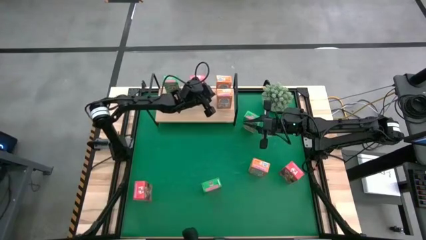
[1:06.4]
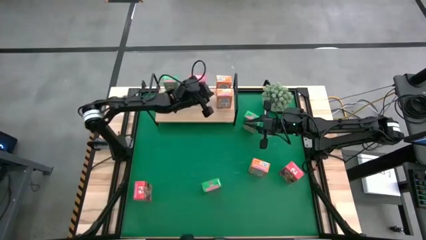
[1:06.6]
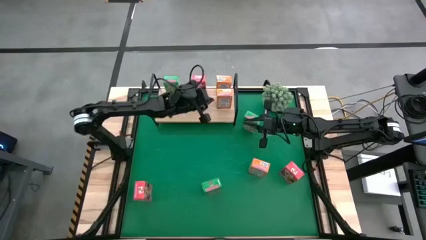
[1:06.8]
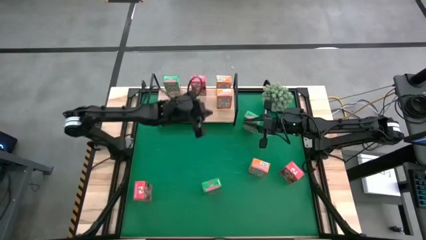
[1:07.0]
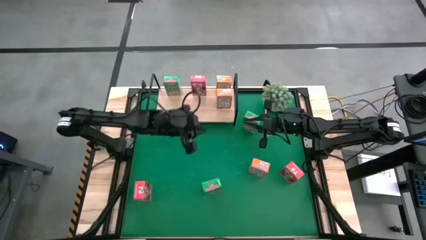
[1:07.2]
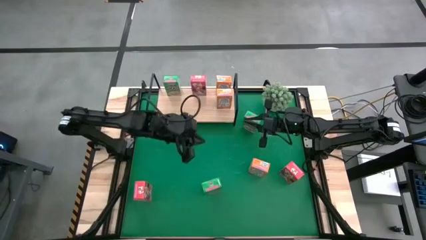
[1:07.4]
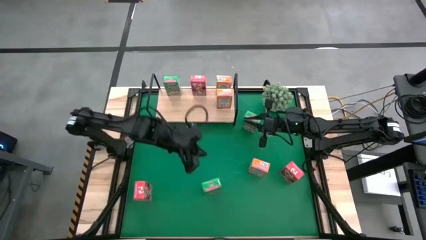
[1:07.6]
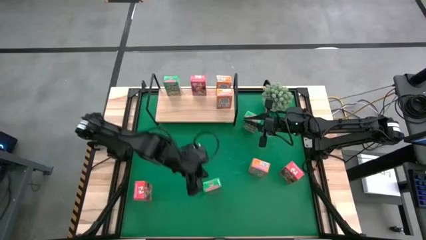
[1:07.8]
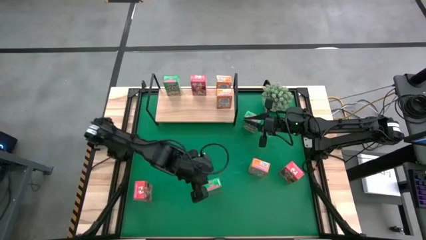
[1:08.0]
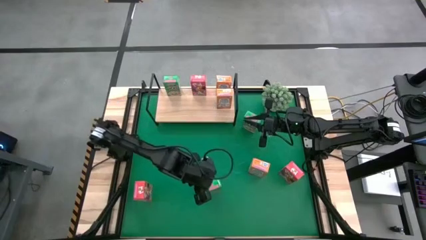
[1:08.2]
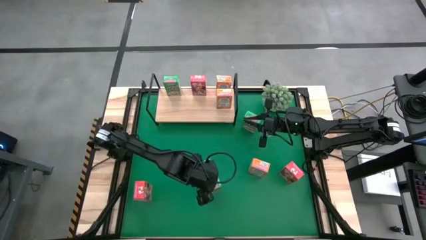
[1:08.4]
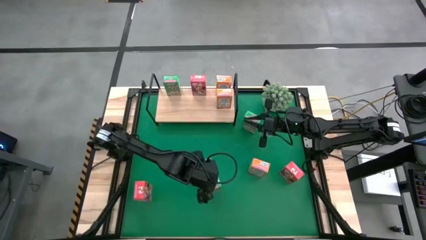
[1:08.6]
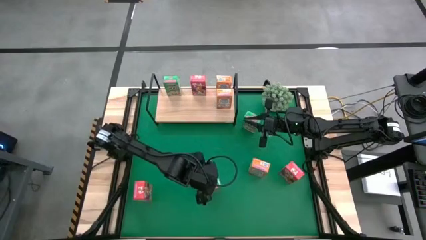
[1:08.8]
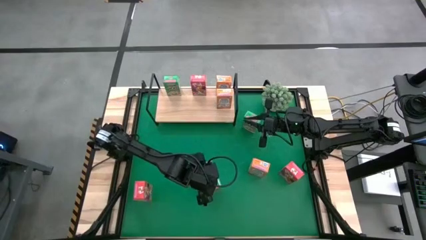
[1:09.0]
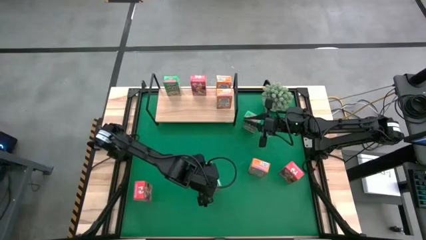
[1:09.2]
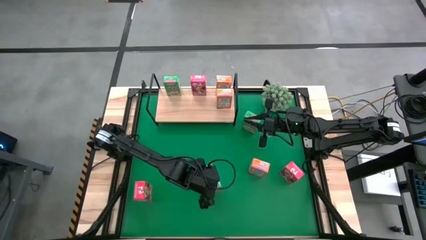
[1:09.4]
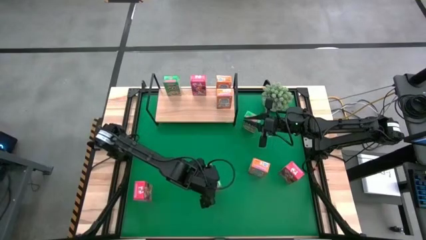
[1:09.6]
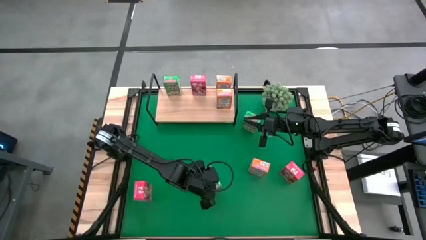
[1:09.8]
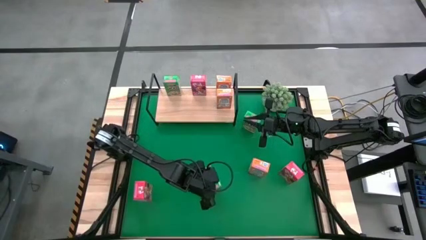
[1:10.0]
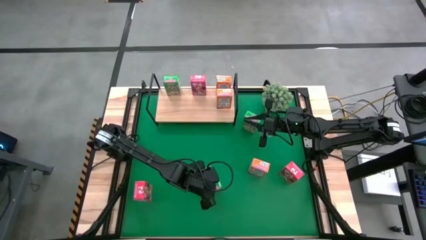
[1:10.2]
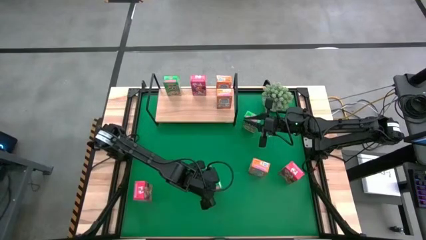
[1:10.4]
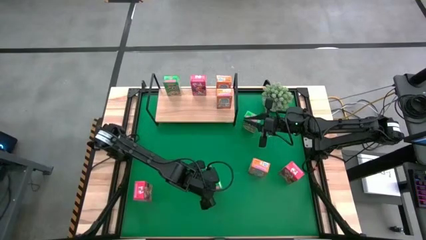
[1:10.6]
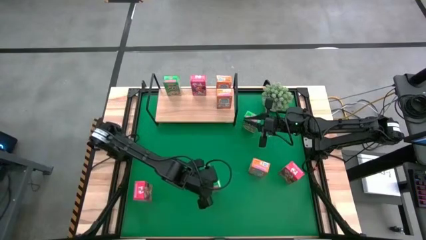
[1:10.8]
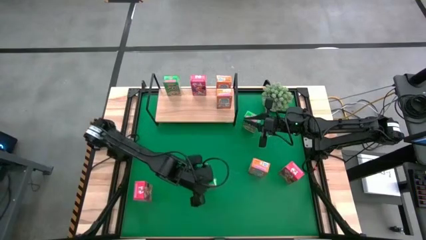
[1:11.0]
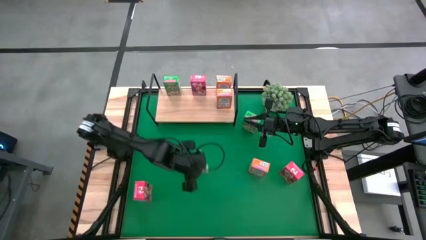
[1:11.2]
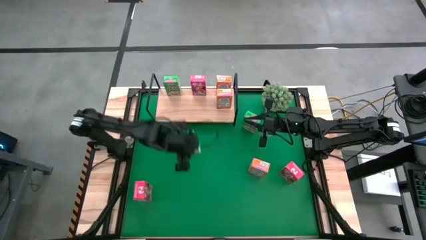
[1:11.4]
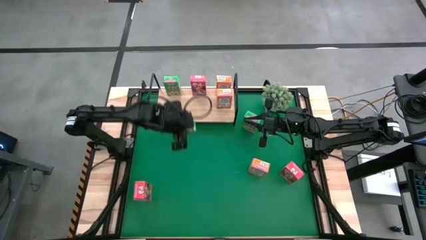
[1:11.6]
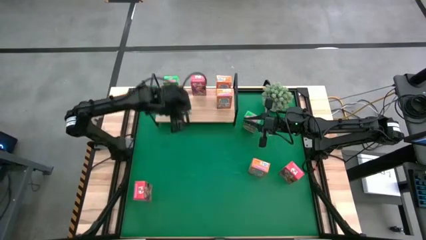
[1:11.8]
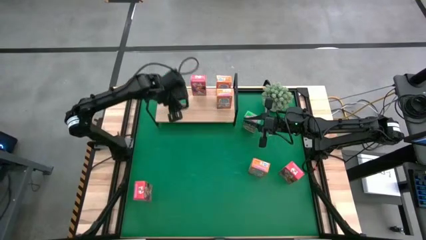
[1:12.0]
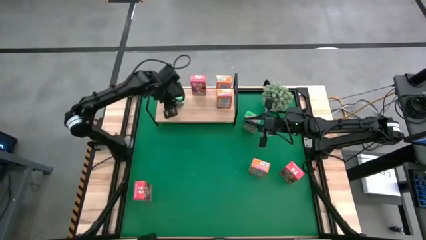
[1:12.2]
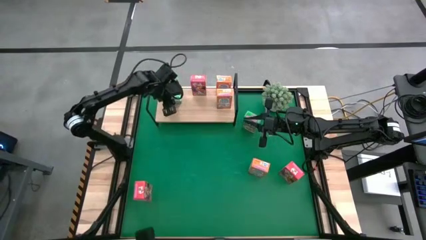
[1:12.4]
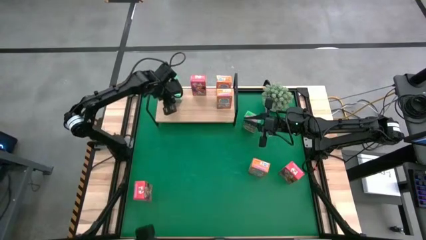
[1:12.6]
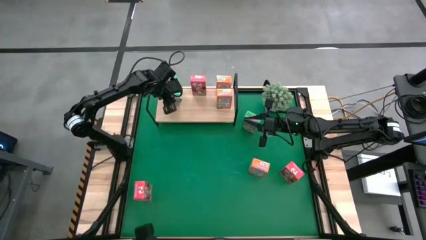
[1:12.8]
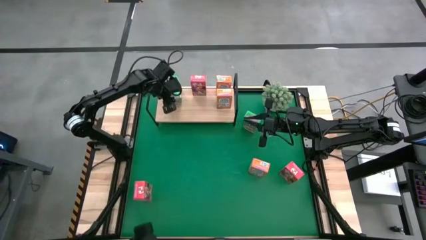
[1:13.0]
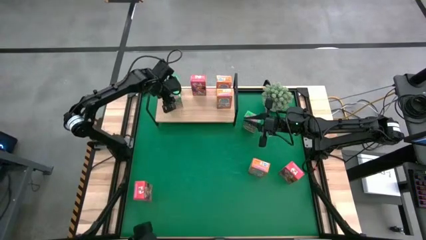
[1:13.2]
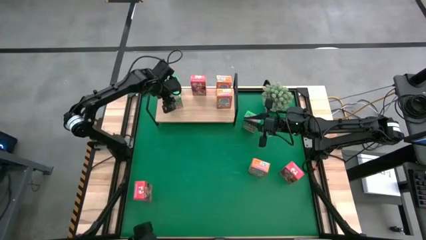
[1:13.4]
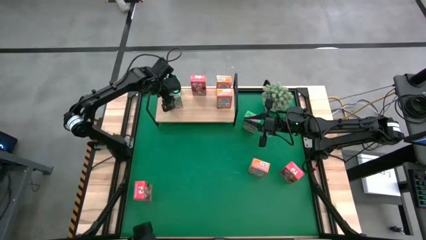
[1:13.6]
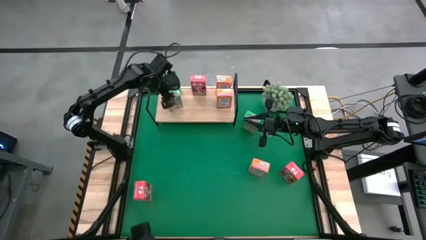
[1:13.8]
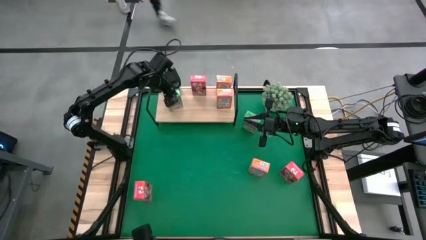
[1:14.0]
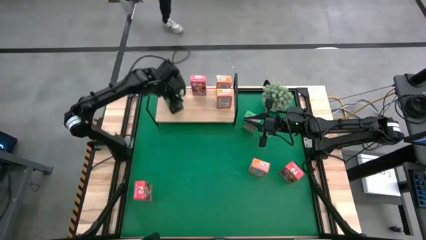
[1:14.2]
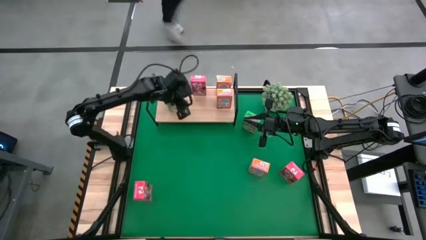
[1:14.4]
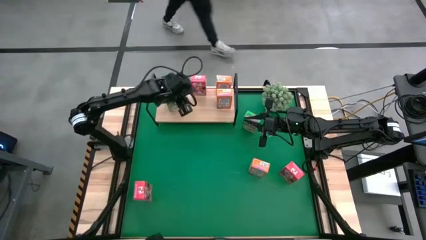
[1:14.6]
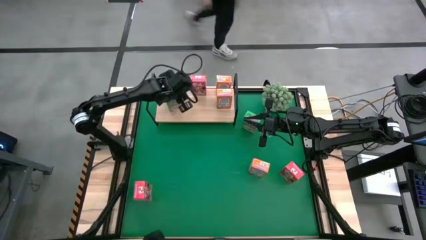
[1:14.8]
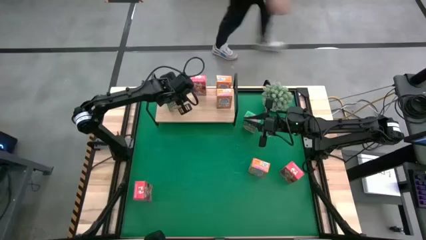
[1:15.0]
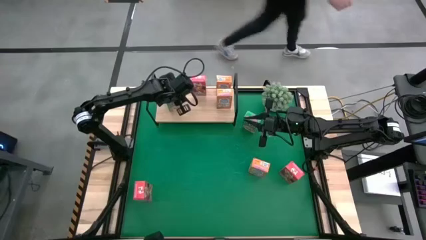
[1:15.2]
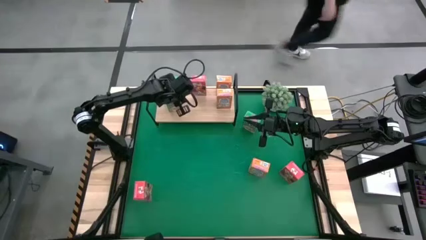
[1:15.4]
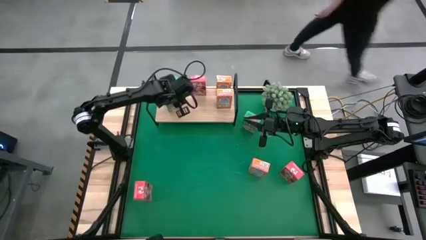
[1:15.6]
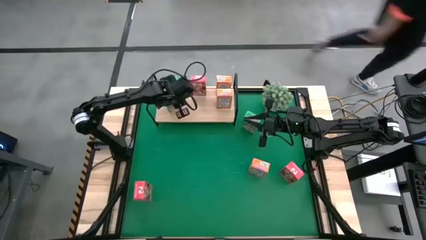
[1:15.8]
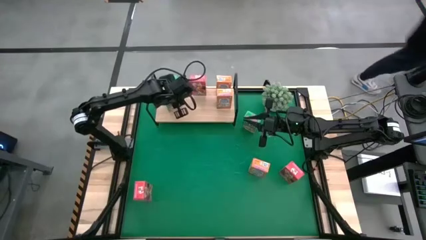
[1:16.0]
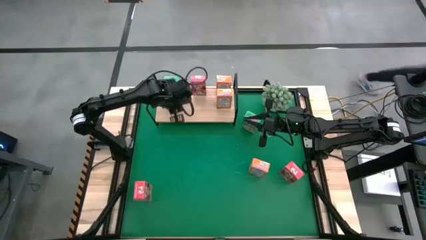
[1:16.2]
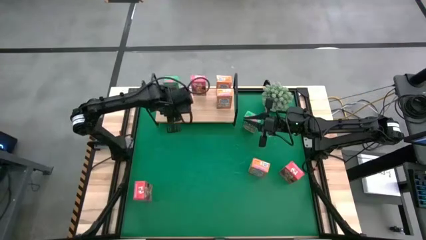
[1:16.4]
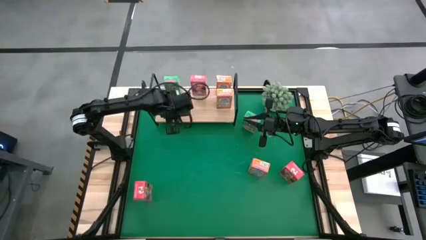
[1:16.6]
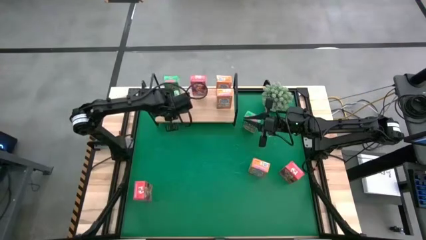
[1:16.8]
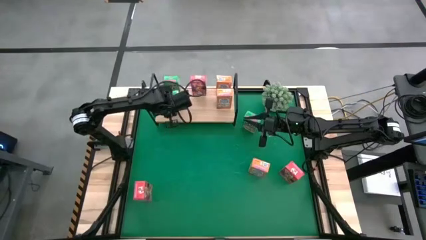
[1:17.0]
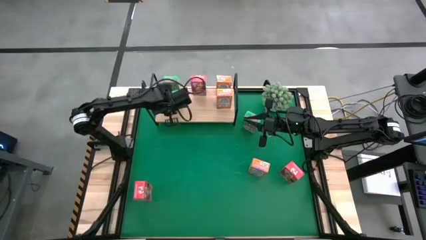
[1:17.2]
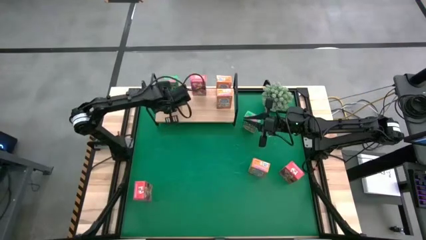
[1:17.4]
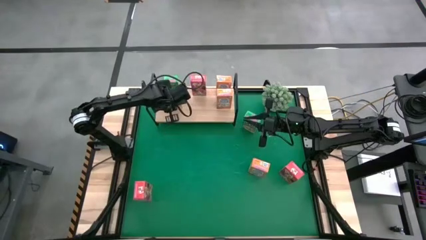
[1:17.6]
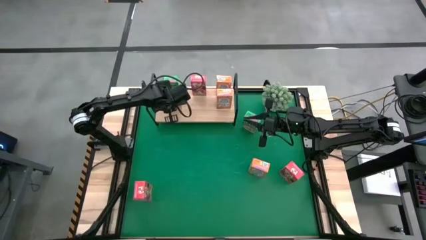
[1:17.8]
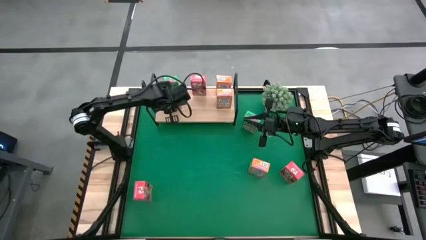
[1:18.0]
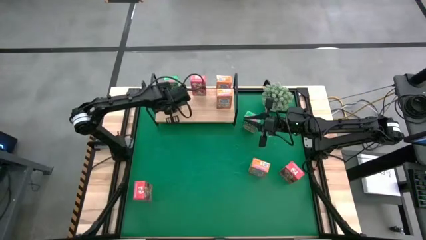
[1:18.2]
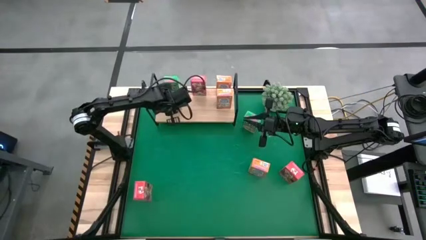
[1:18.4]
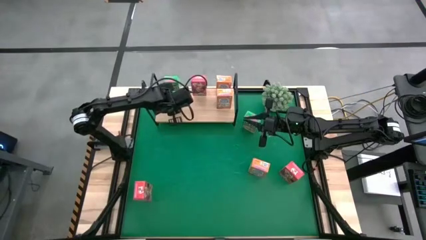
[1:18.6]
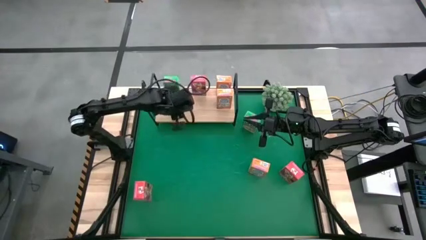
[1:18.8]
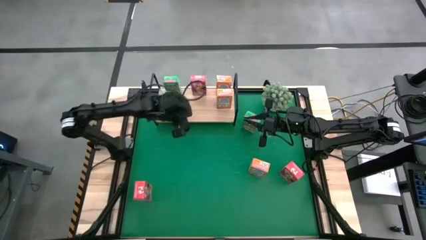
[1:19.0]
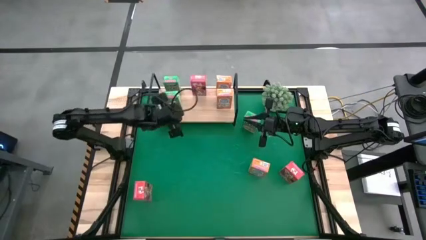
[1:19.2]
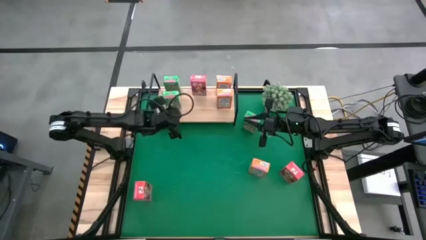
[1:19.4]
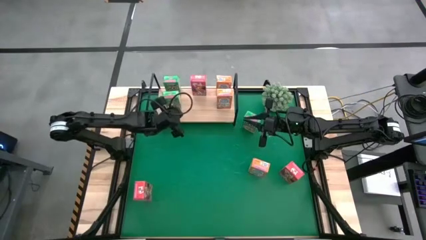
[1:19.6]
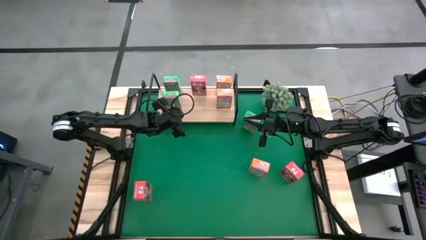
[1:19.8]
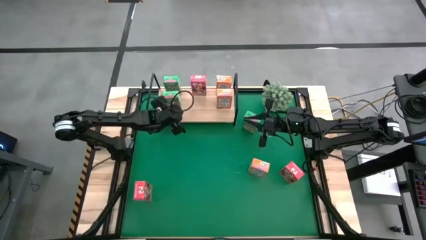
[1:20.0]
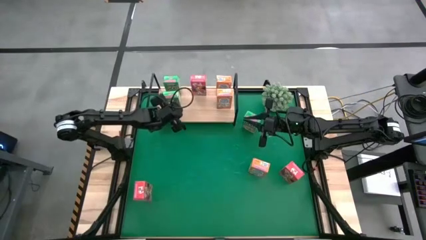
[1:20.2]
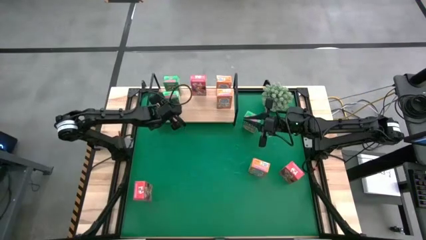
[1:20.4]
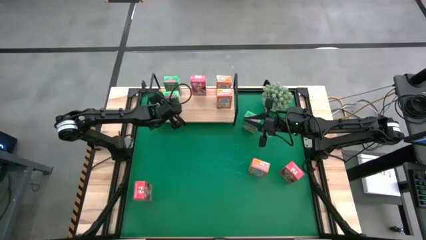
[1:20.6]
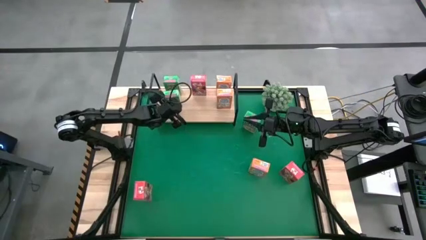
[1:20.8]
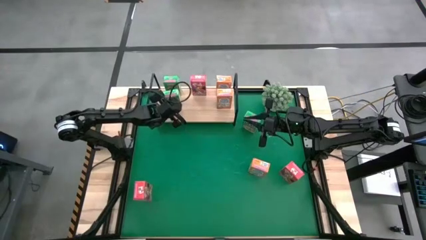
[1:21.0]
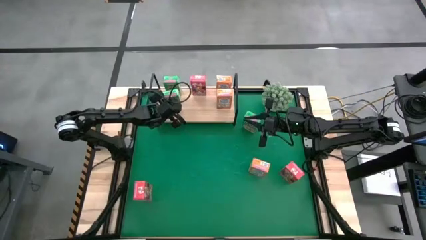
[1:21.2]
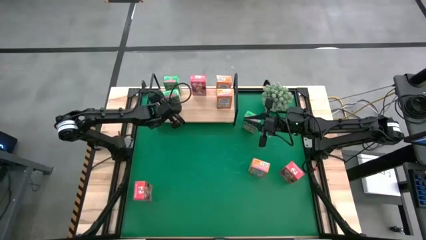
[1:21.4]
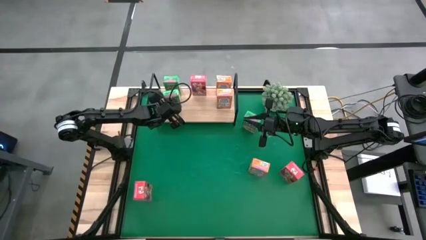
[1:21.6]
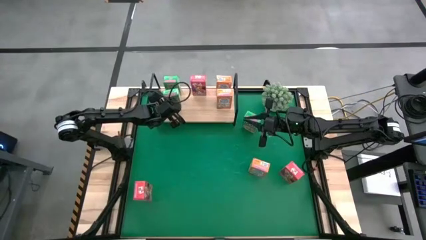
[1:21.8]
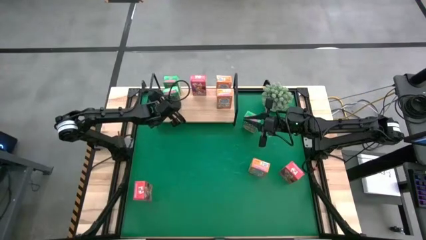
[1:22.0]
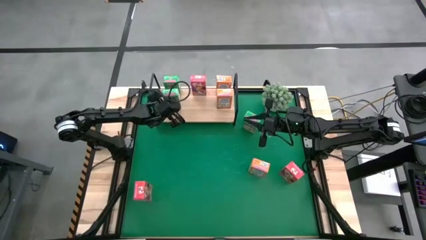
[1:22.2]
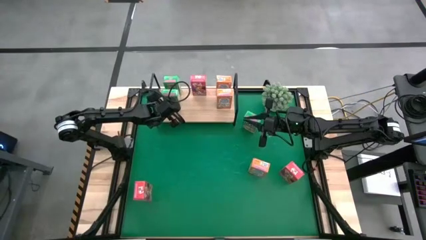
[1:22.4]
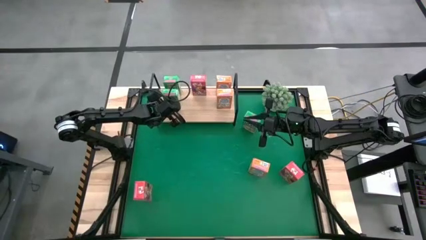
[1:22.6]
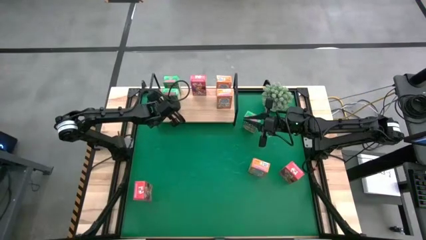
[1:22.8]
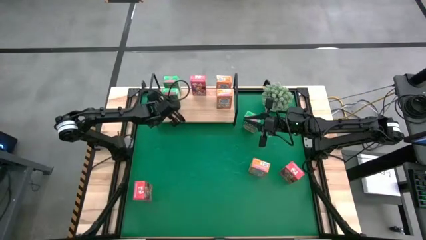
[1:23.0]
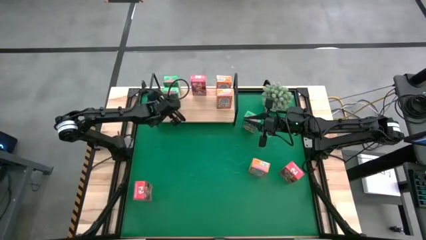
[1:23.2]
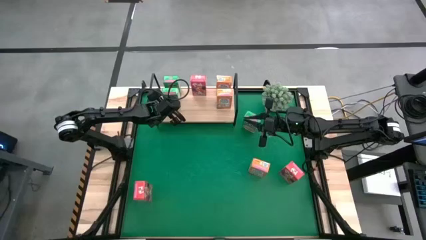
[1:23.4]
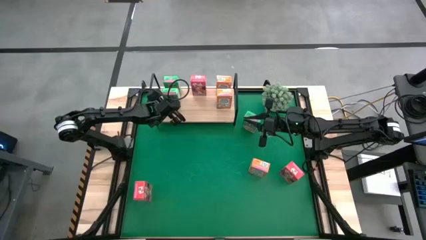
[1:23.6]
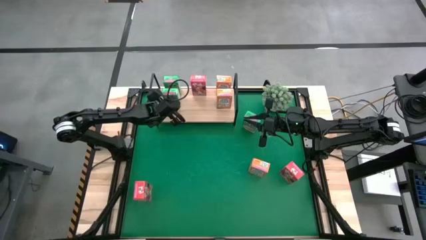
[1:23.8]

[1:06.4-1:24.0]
Task: Stack cereal on shelf
Put the bottom green cereal box aligned with the other green cereal box on the shelf
